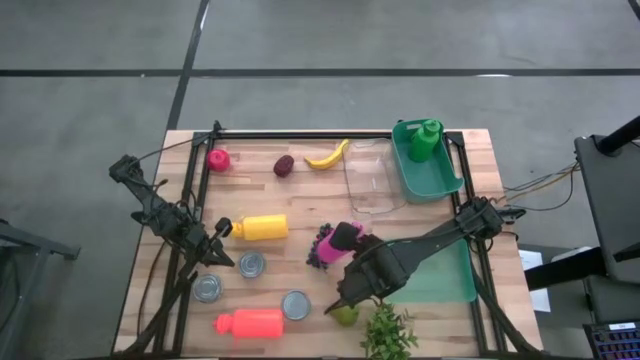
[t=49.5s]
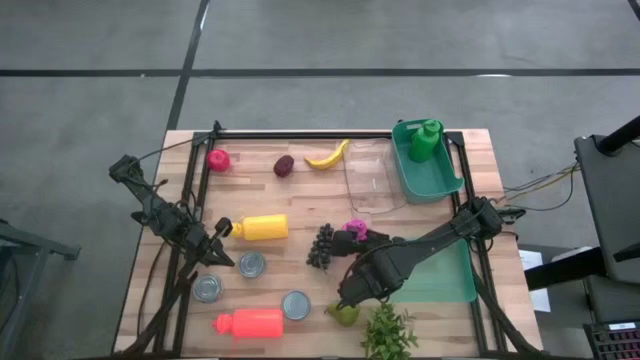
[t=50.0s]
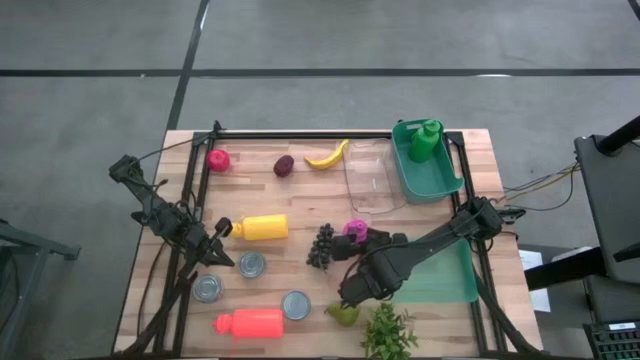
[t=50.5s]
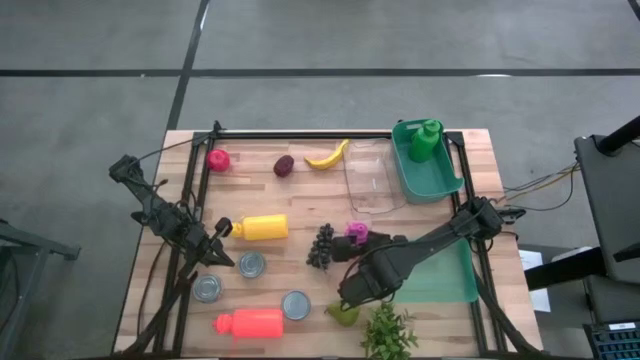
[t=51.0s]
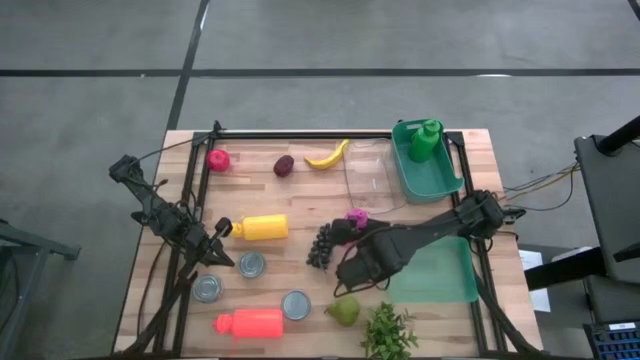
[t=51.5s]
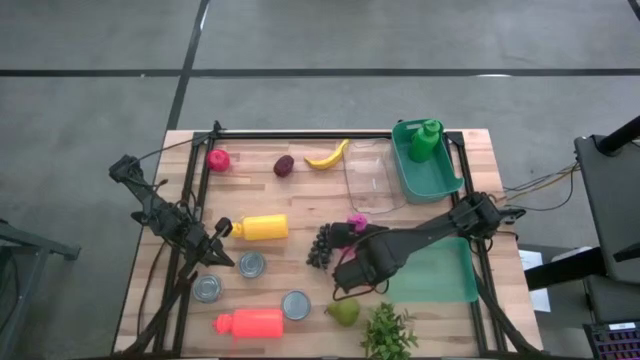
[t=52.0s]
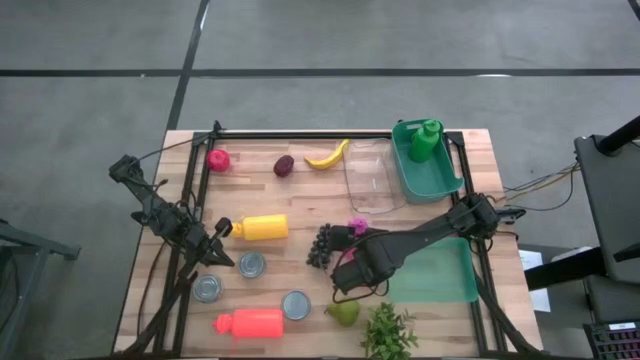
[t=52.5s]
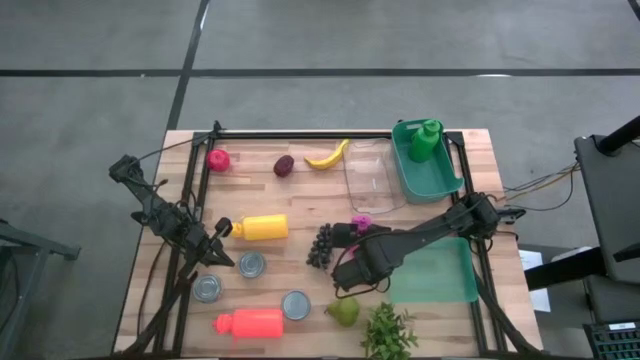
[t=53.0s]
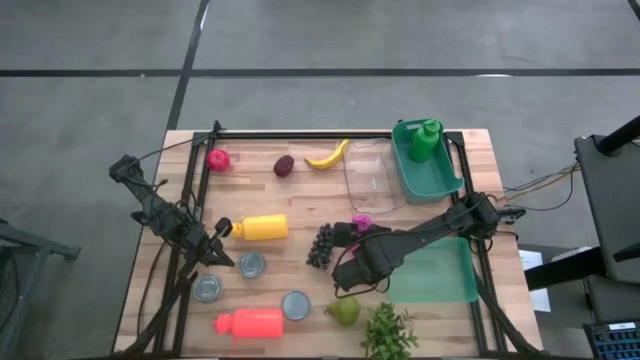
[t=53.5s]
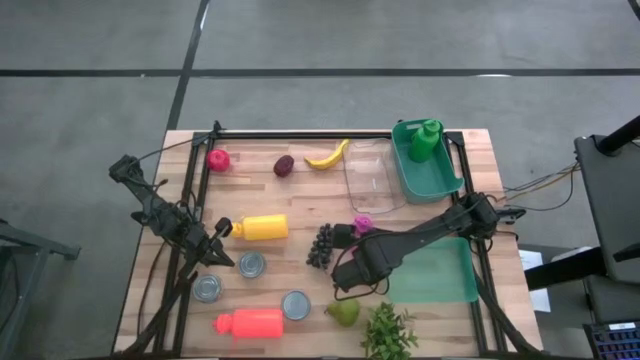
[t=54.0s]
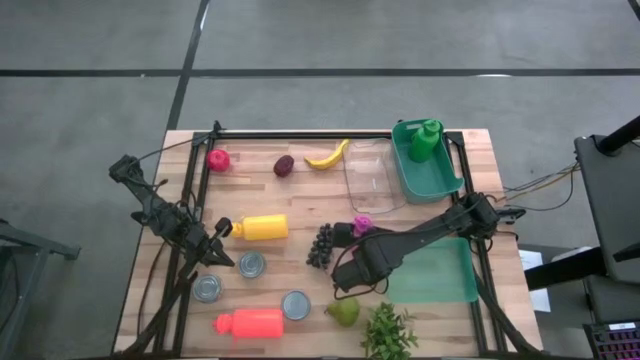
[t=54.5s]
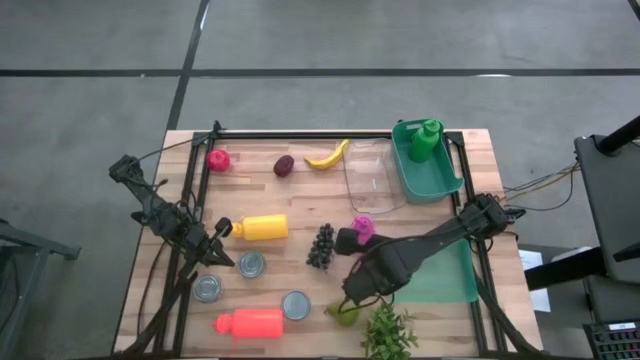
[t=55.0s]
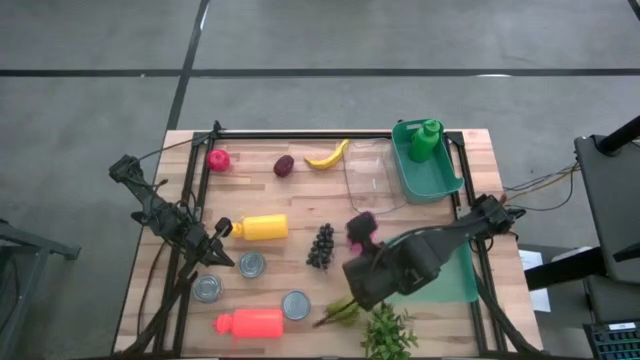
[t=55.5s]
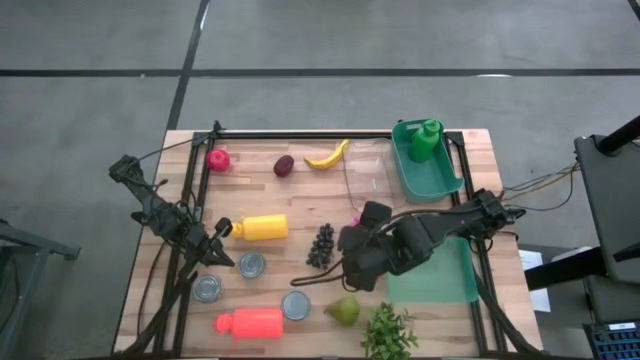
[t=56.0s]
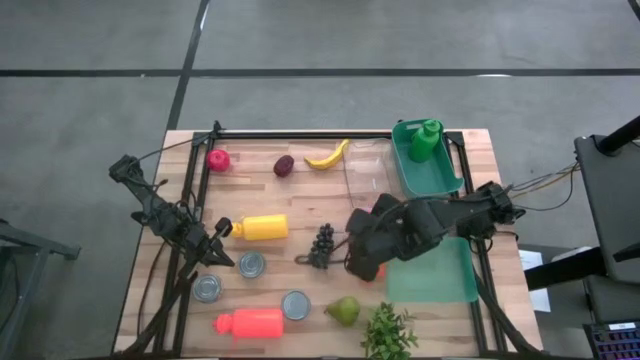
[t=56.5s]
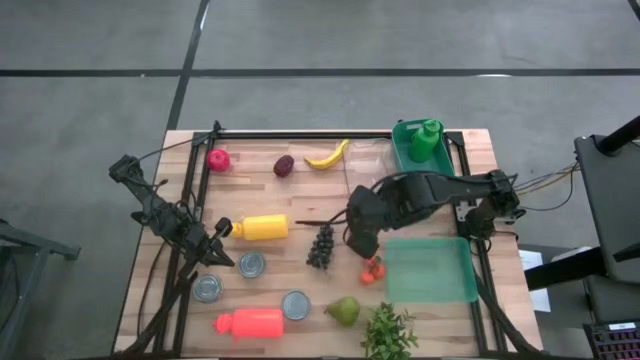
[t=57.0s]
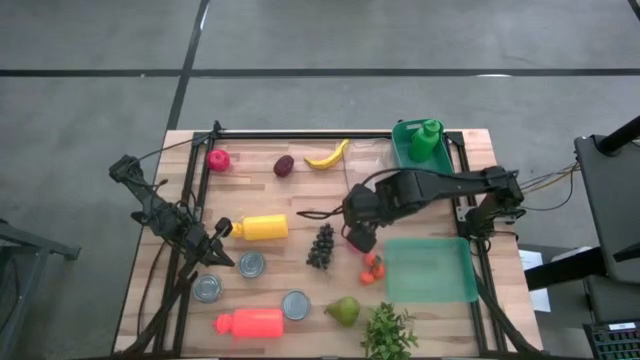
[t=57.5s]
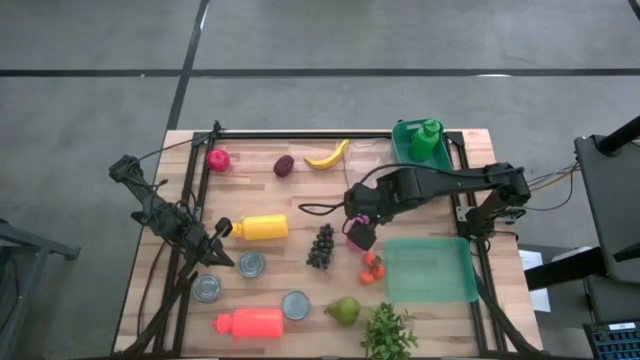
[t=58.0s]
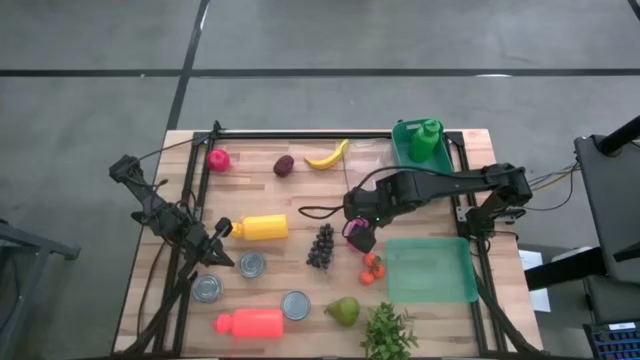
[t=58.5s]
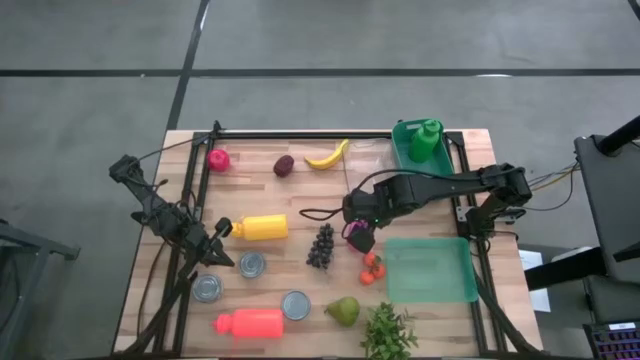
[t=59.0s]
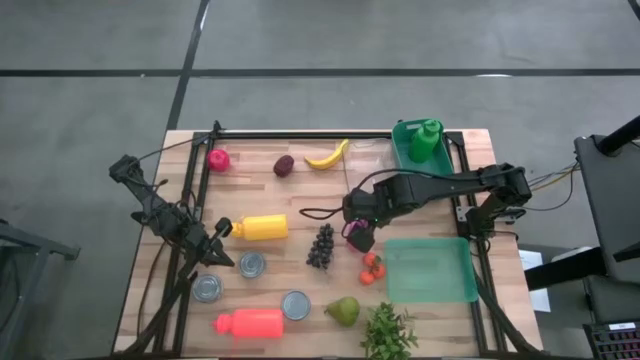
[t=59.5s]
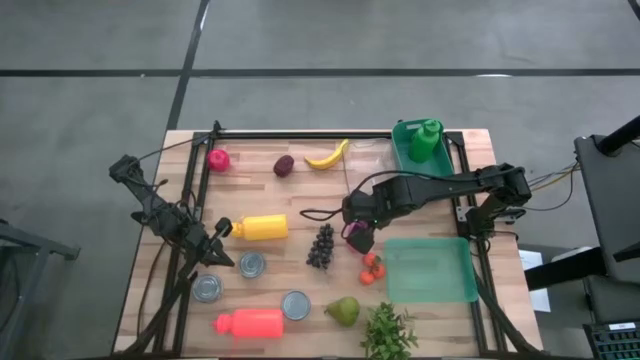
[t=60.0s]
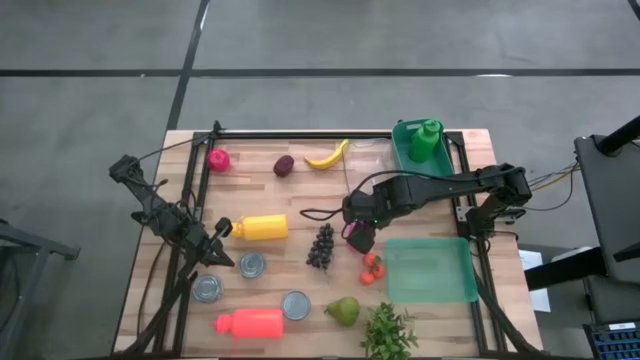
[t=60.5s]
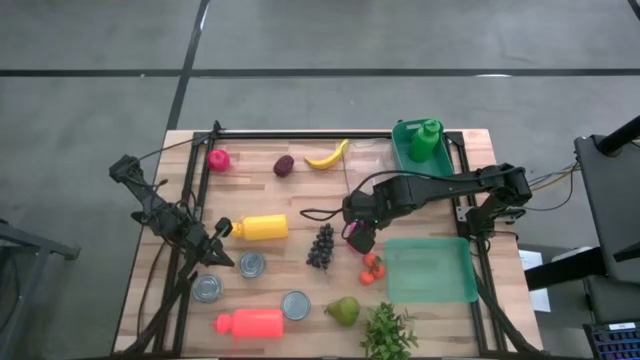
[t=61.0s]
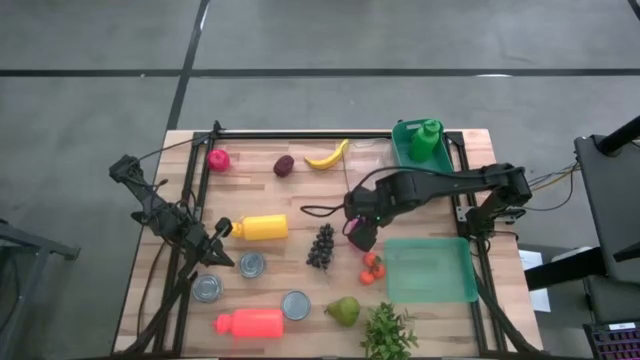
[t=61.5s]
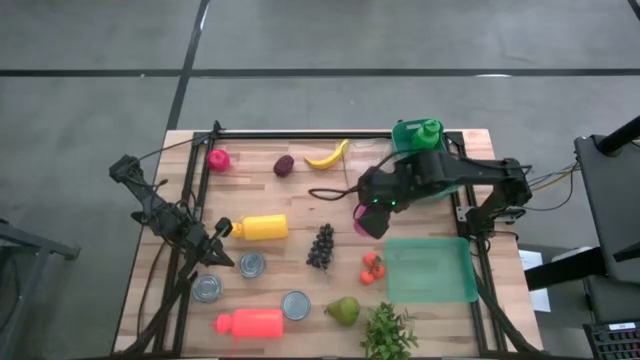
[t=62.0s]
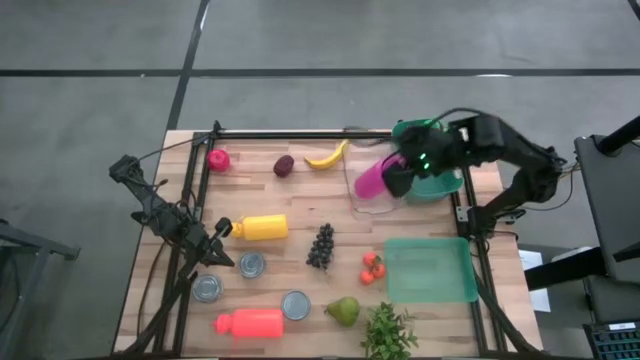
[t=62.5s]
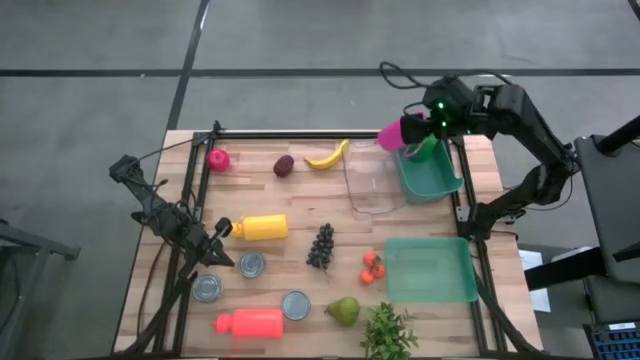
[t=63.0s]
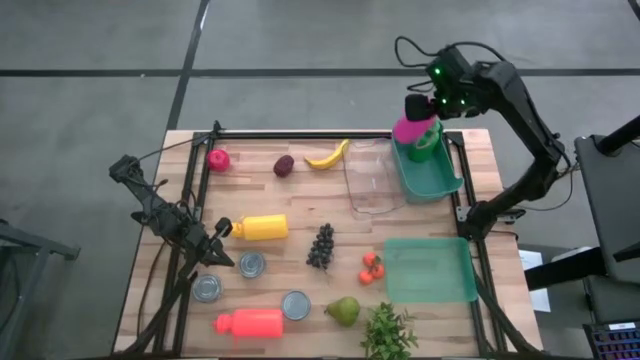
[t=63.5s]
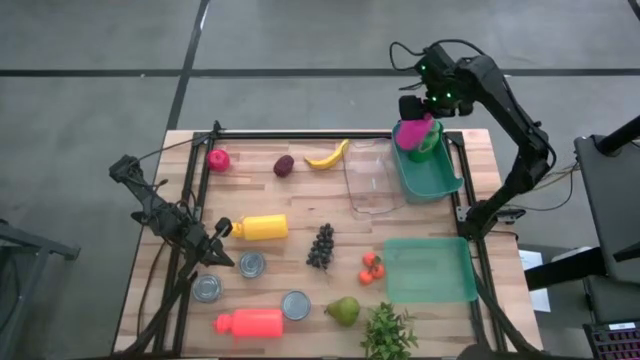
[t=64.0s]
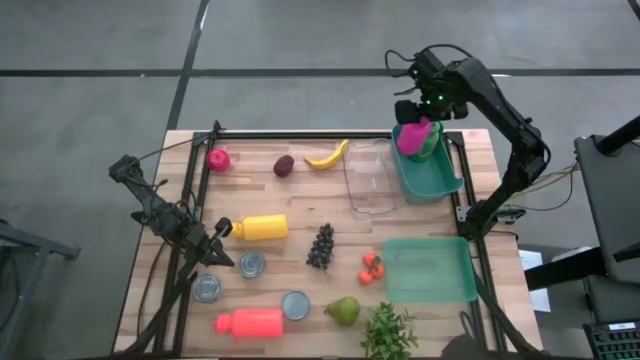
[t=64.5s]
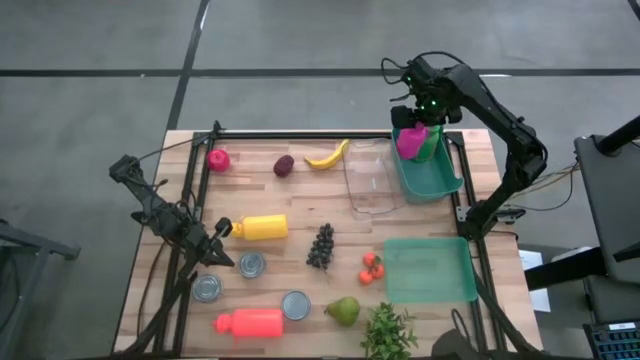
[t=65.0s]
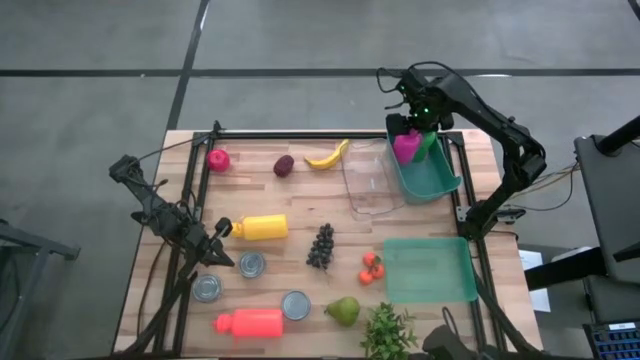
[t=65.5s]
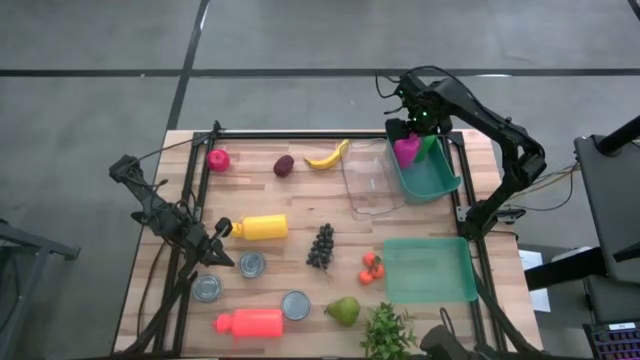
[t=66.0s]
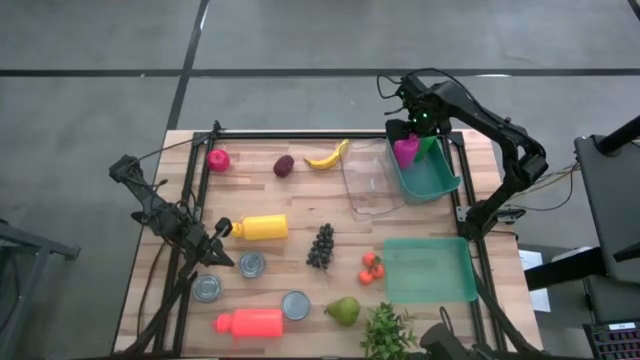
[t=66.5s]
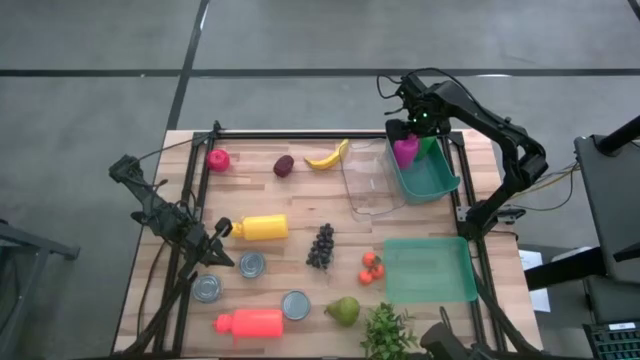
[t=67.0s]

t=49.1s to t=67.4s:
Task: Pick & Place Food Item
Put the pink water bottle into the green bin

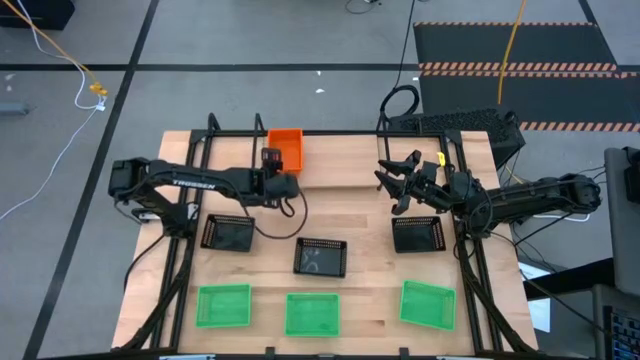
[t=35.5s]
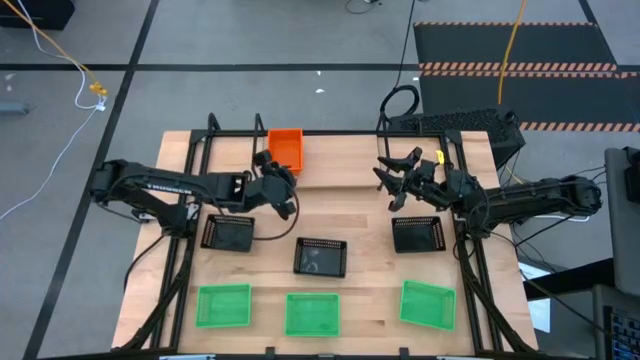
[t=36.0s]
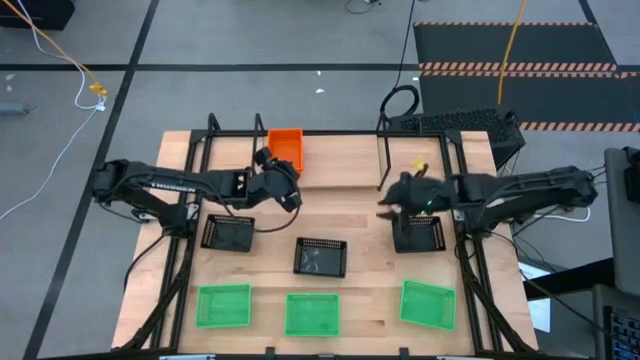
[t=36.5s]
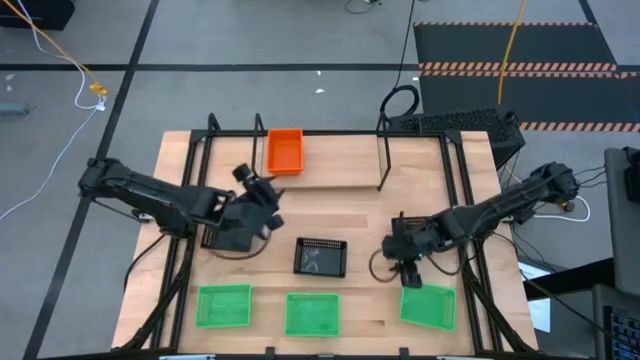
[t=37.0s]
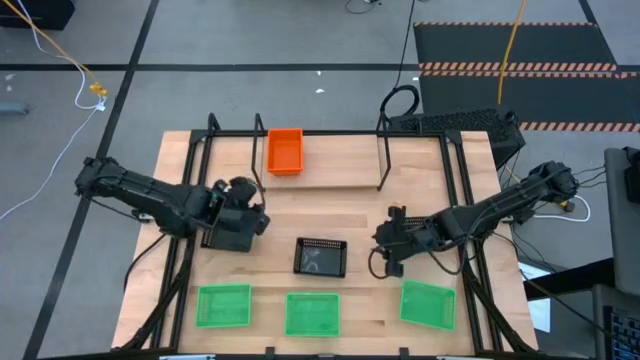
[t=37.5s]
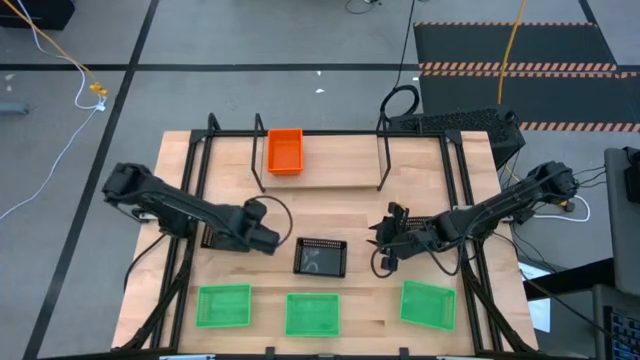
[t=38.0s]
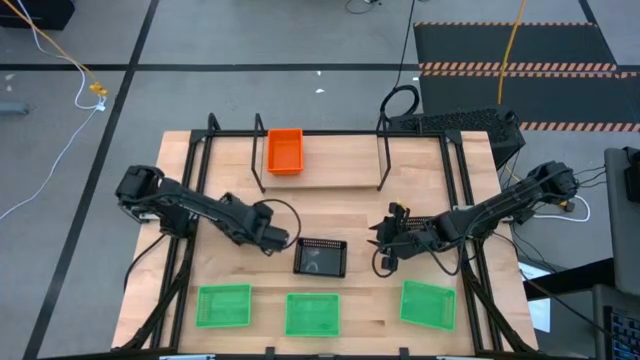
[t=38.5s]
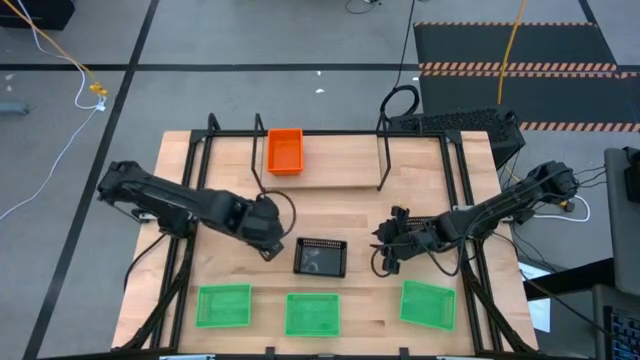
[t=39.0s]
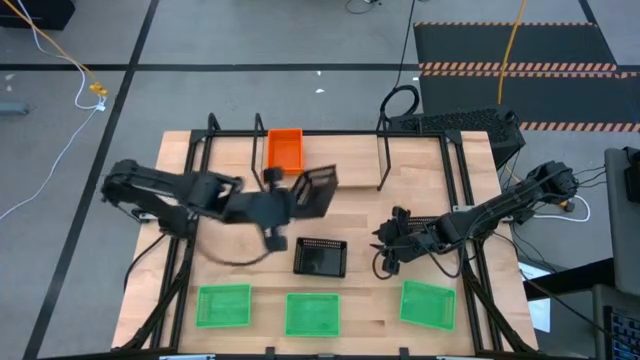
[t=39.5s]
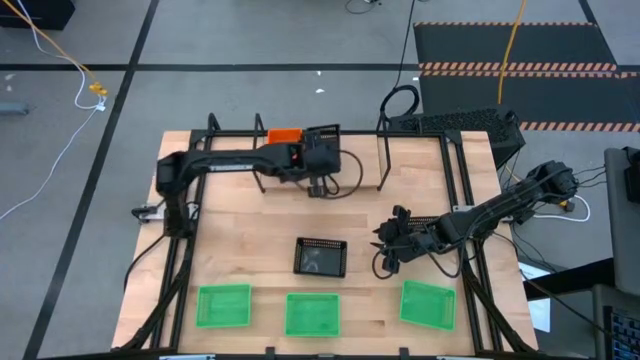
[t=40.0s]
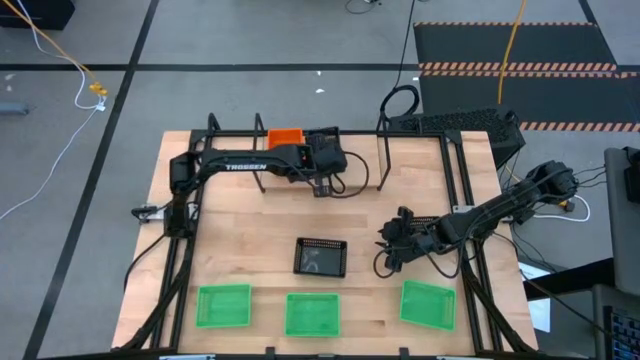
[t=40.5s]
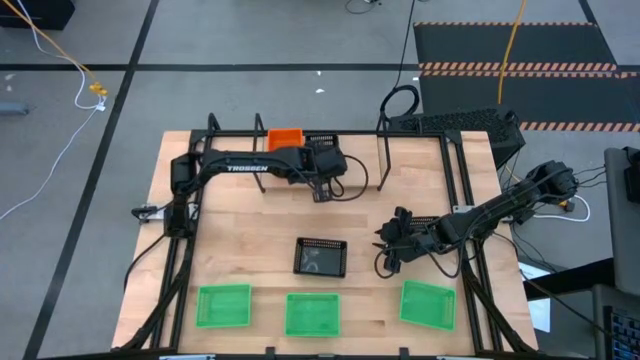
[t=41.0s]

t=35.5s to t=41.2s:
Task: Stack baskets on shelf by color
Put the top left black basket on the shelf
